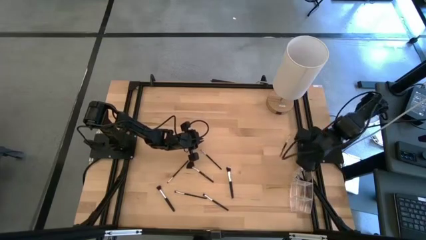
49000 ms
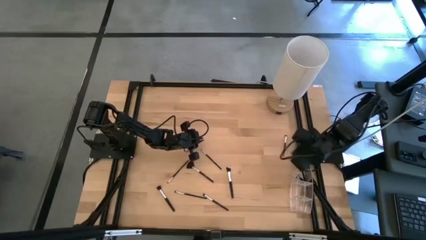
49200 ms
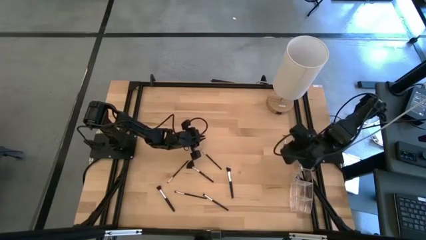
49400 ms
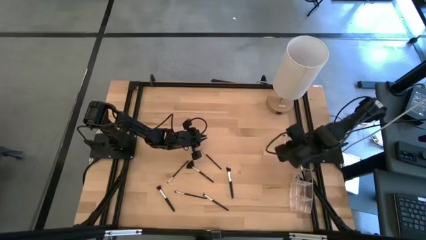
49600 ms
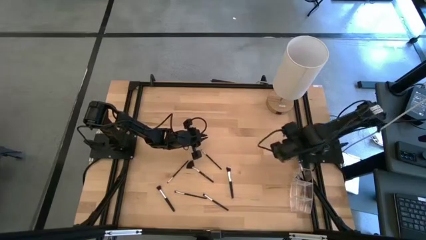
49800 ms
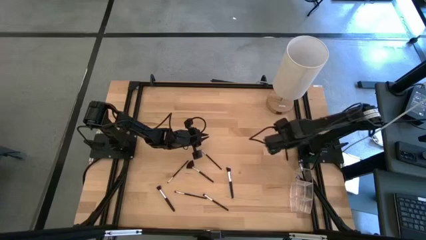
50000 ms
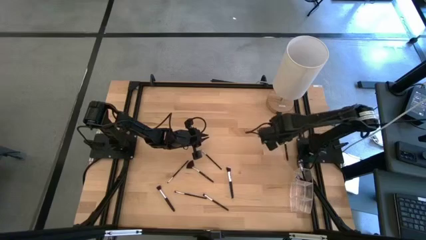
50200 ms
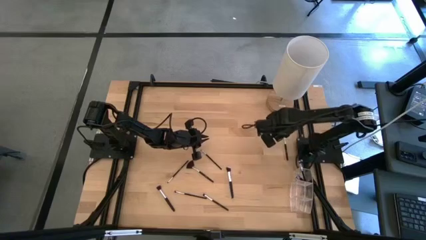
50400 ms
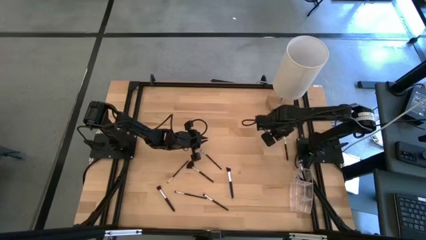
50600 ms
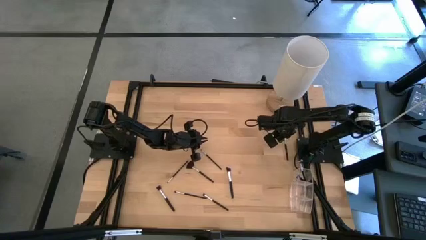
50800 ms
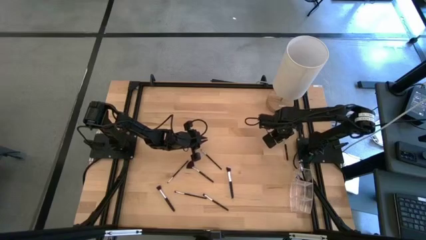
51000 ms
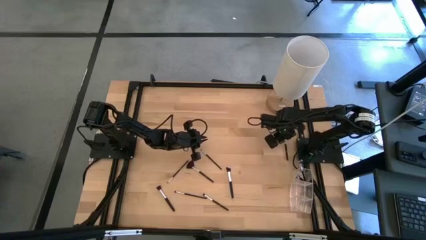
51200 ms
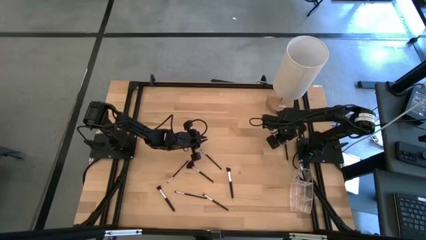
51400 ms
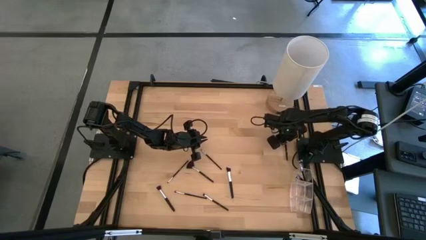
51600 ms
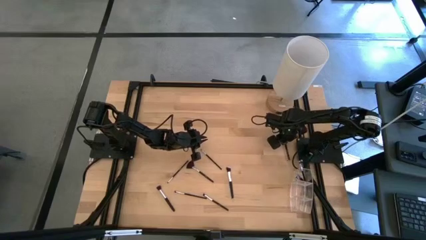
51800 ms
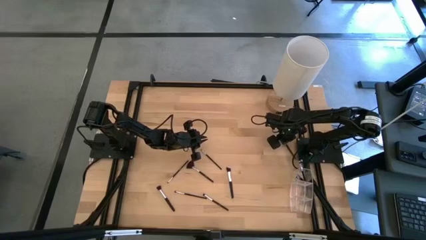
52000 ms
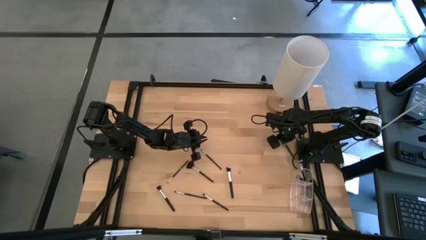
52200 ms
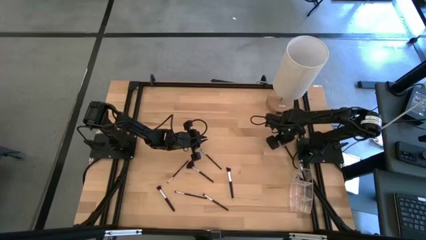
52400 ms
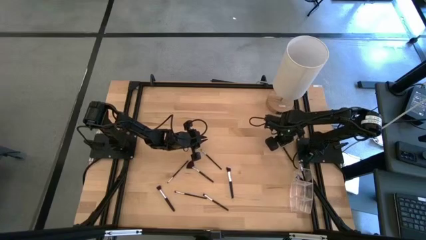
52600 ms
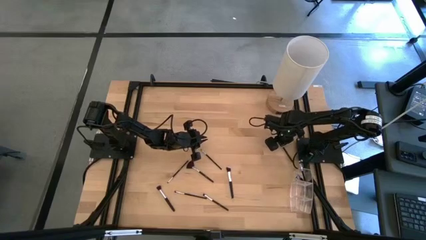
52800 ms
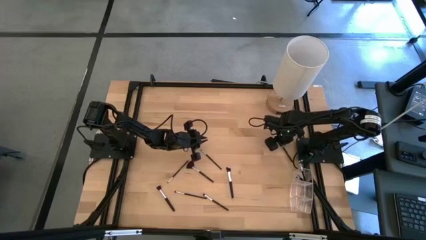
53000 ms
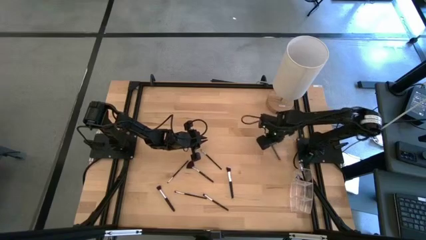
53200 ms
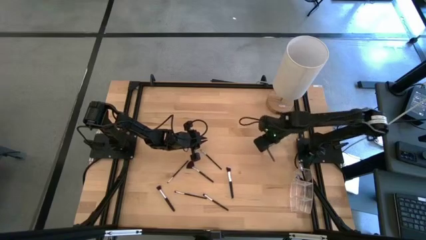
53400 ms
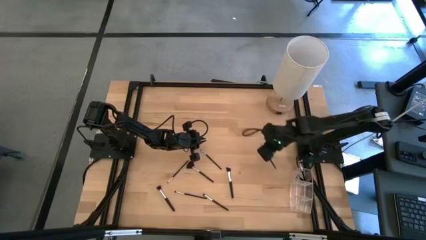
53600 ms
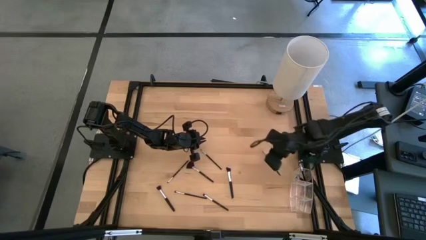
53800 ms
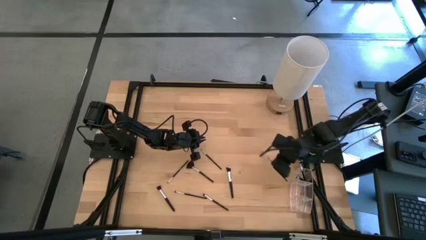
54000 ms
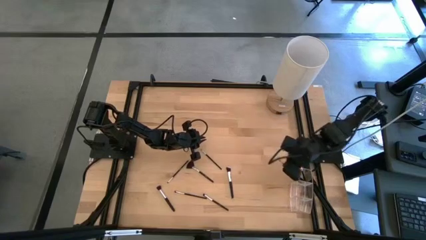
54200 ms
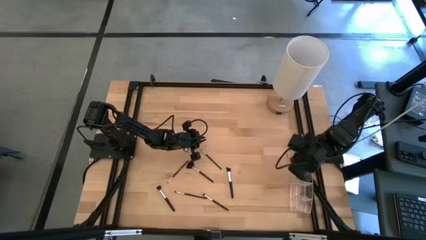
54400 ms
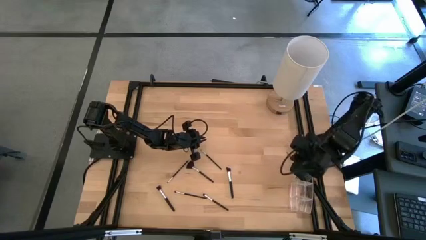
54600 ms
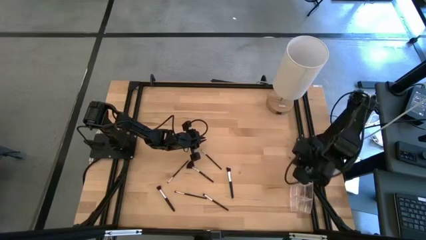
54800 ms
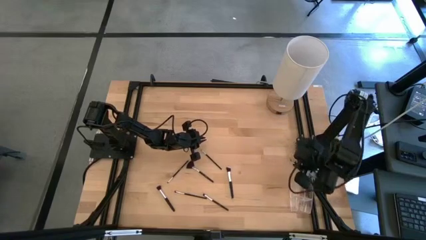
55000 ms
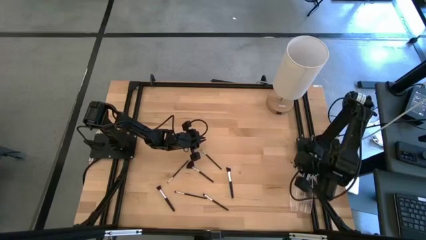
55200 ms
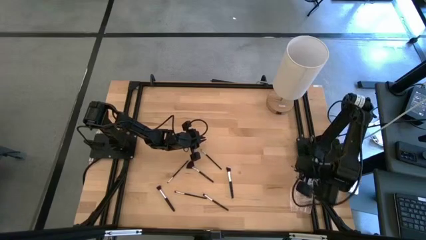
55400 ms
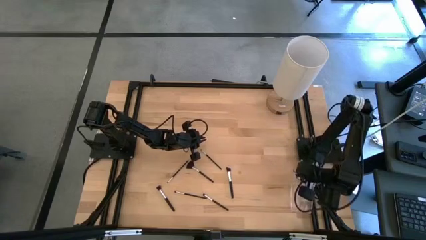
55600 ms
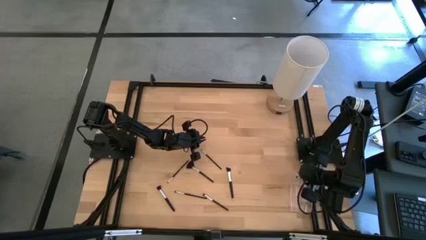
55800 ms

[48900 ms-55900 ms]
Task: Put items in baskets/containers
Put the foundation brush into the left section of the transparent organizer

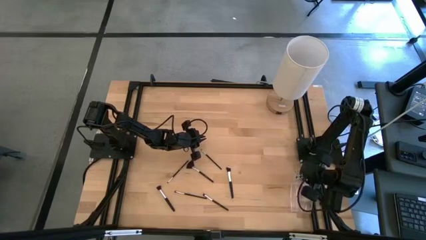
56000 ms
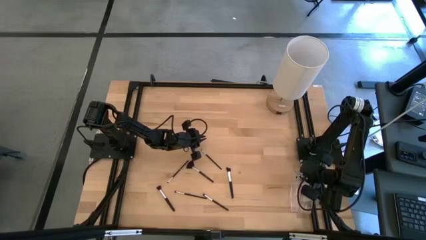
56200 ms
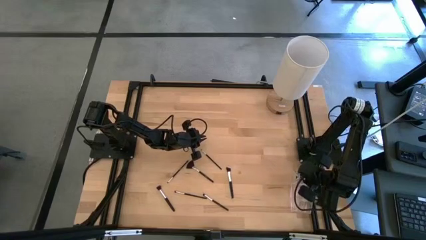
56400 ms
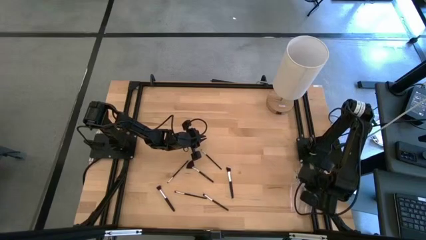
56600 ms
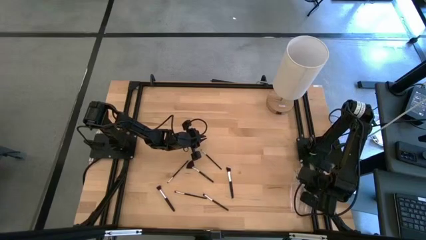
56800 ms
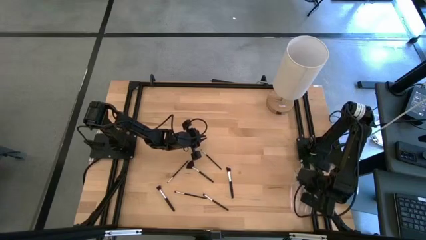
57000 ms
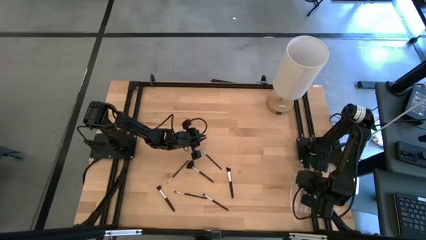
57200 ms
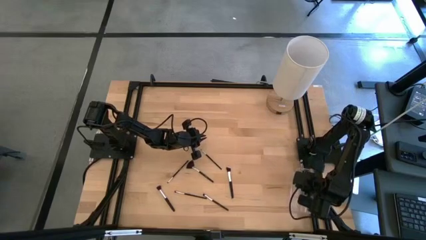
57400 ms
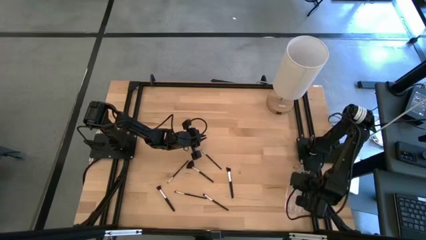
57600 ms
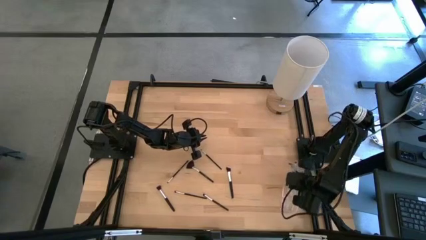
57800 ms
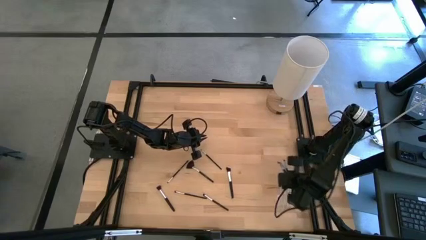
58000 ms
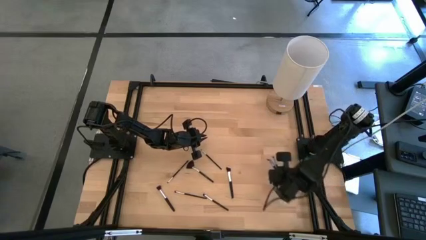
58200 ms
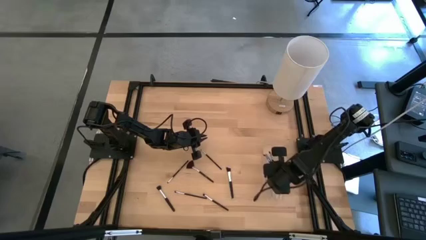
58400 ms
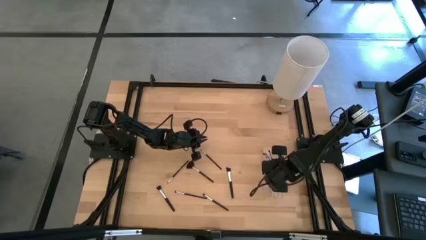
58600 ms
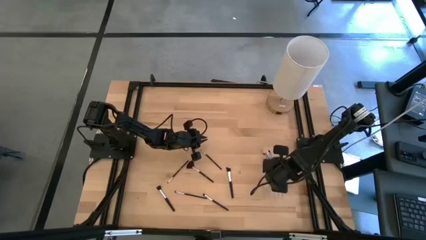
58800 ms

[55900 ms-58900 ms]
Adjust the transparent organizer

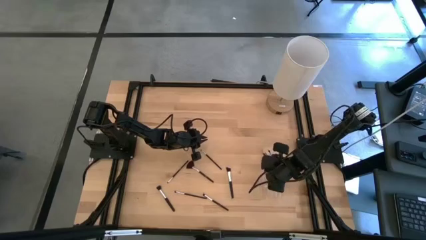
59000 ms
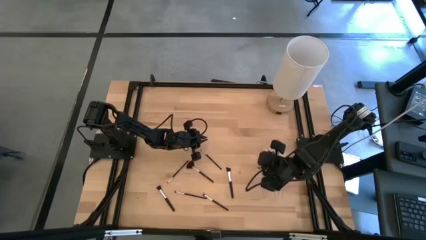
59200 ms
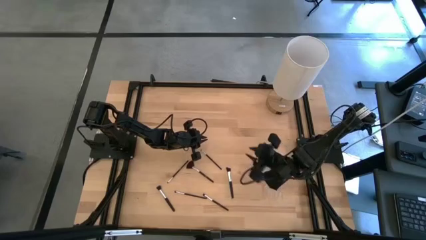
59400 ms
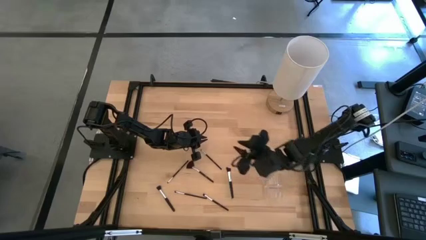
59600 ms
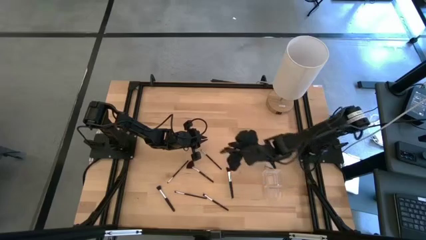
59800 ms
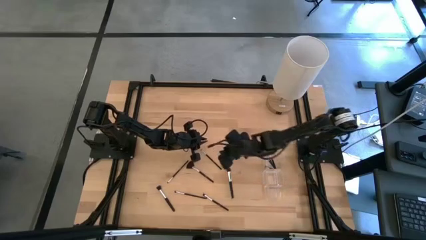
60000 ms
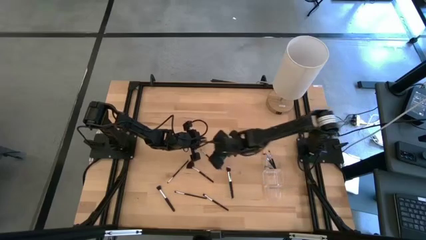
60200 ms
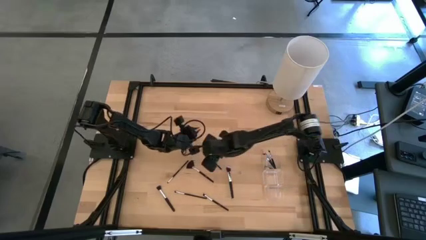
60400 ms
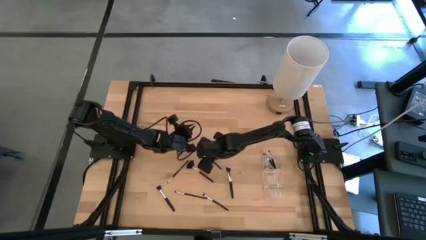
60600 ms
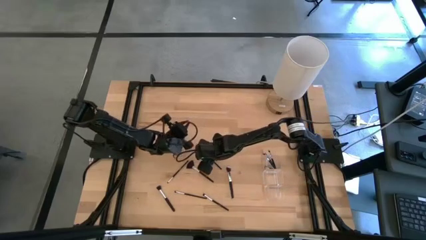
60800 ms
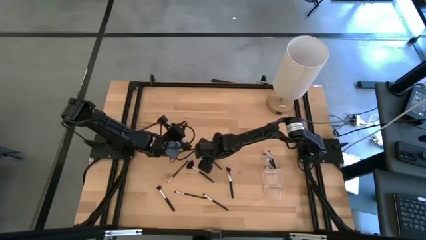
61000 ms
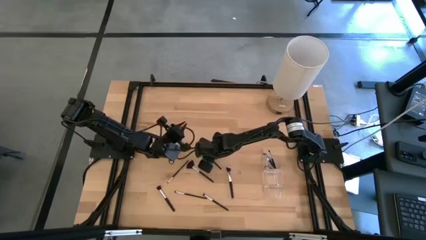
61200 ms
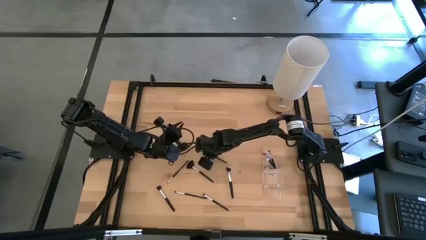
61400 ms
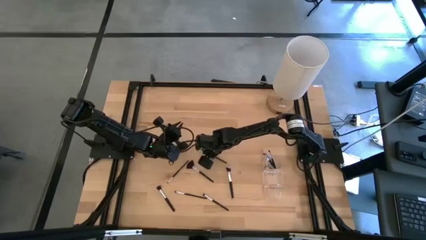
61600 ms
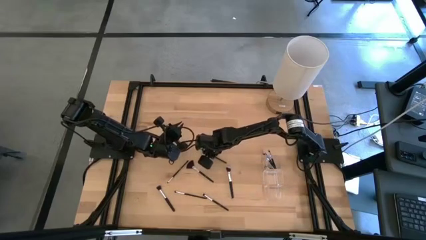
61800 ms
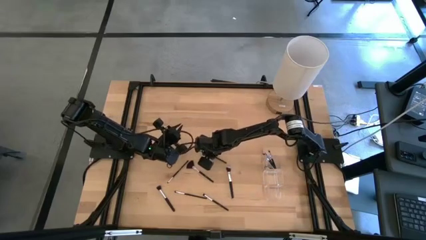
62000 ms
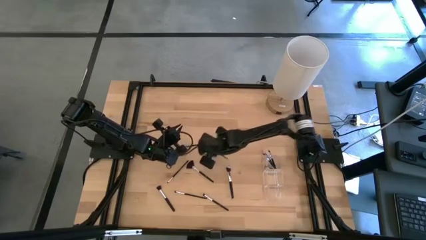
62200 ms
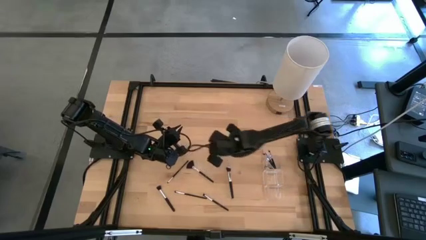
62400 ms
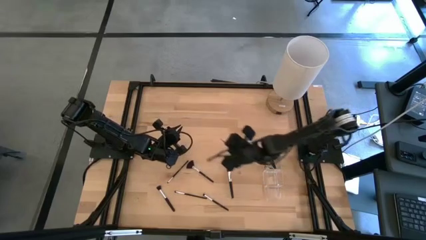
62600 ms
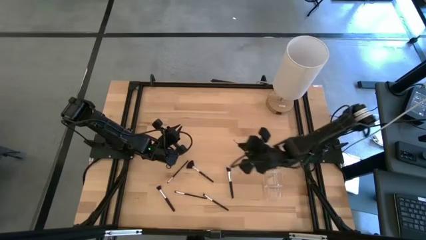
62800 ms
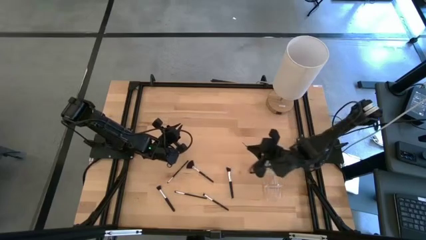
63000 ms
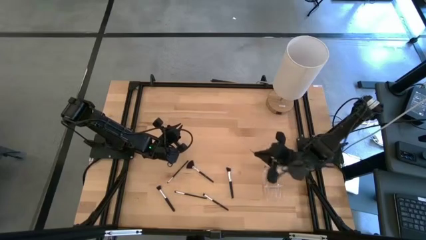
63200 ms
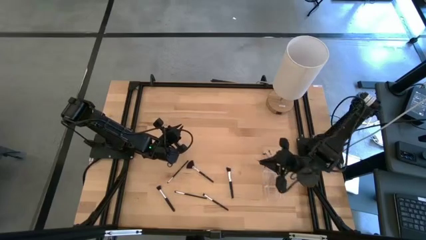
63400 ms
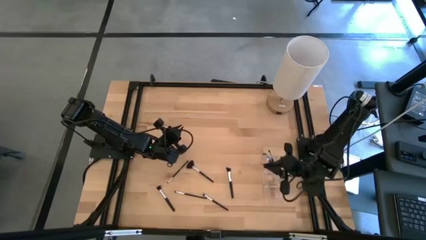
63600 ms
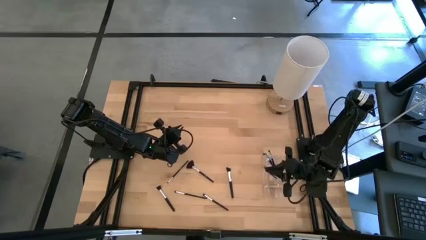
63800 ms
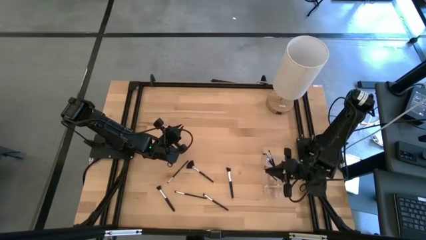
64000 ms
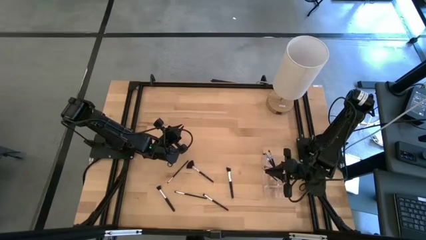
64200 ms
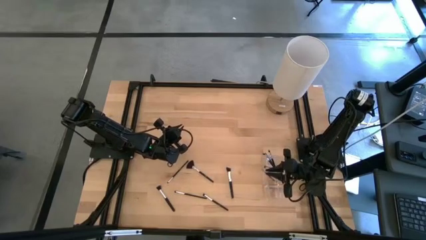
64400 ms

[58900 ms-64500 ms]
Put the right liner brush into the middle section of the transparent organizer
